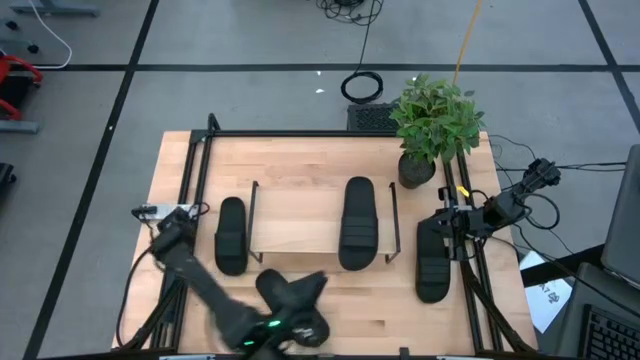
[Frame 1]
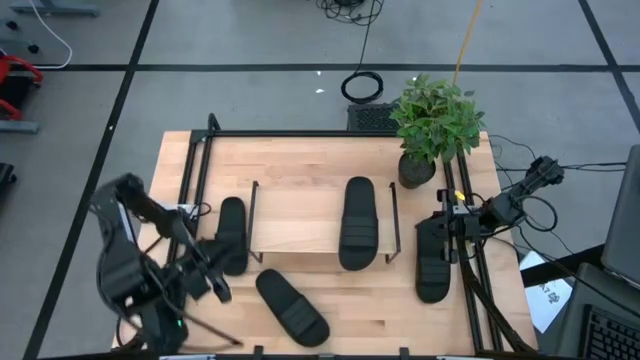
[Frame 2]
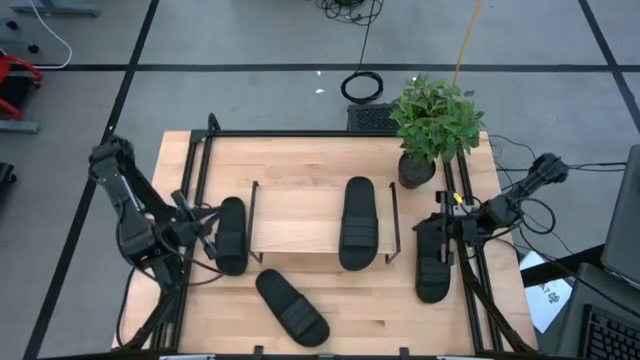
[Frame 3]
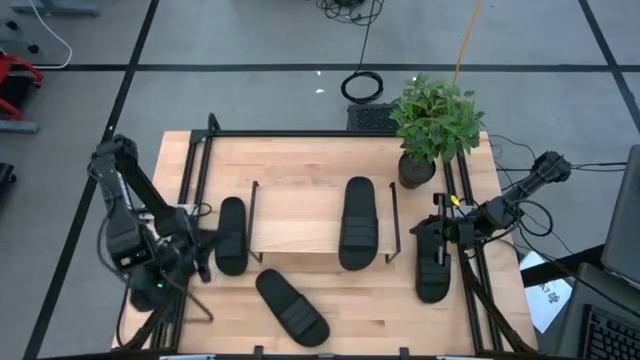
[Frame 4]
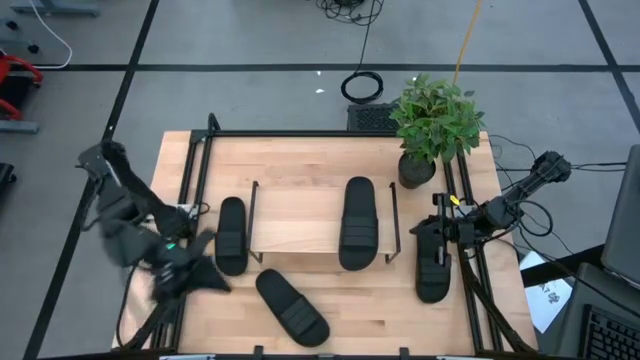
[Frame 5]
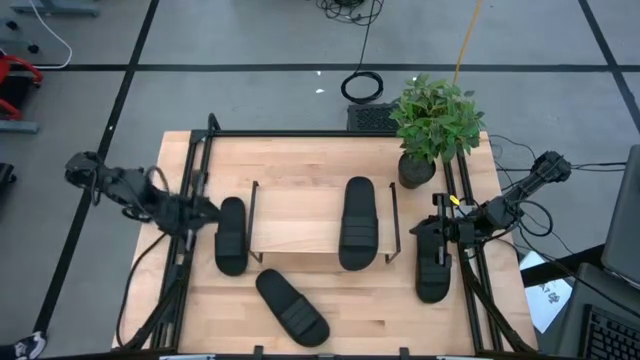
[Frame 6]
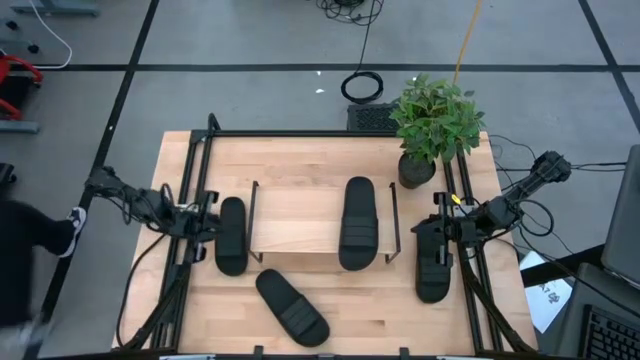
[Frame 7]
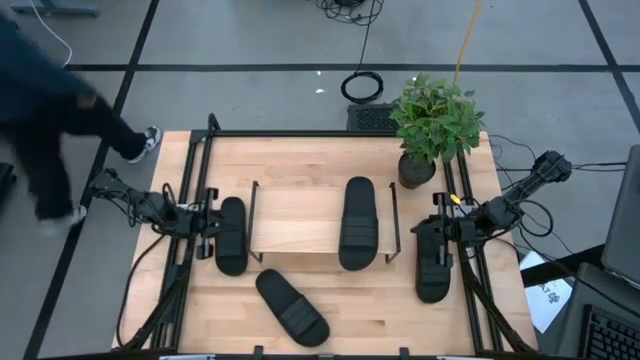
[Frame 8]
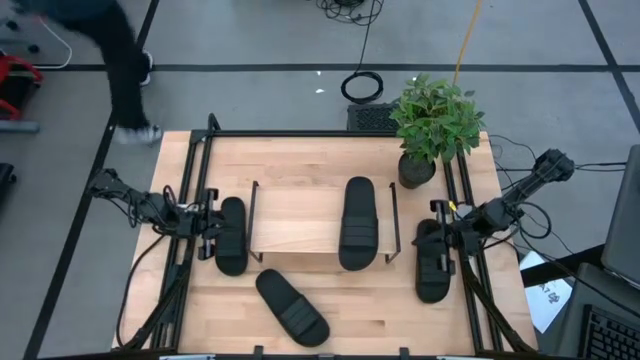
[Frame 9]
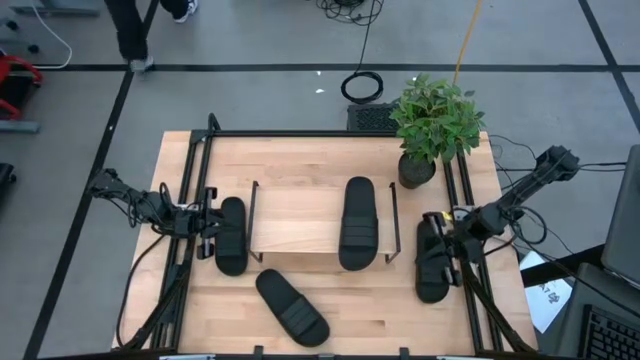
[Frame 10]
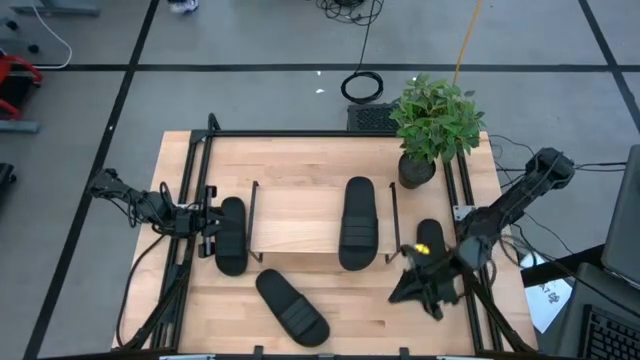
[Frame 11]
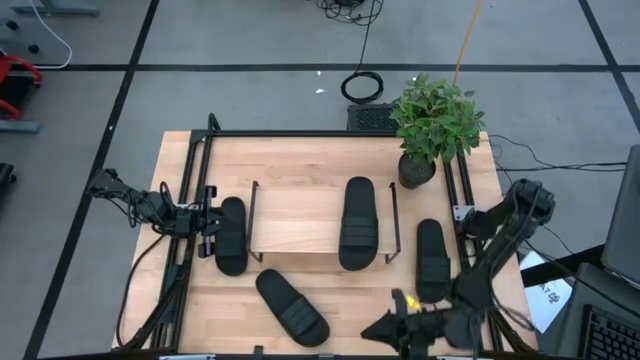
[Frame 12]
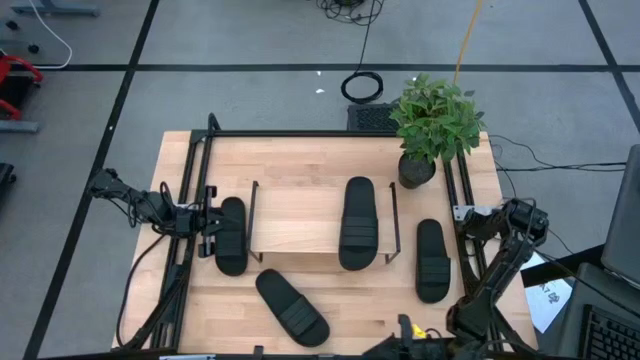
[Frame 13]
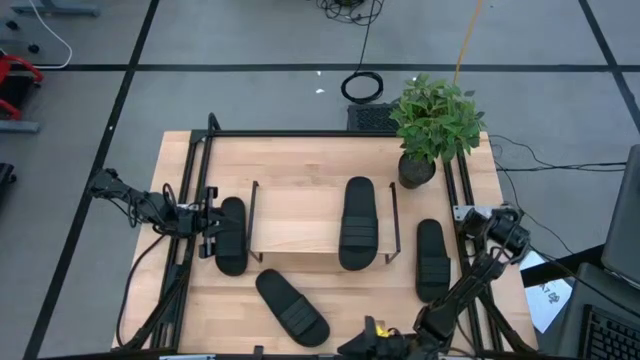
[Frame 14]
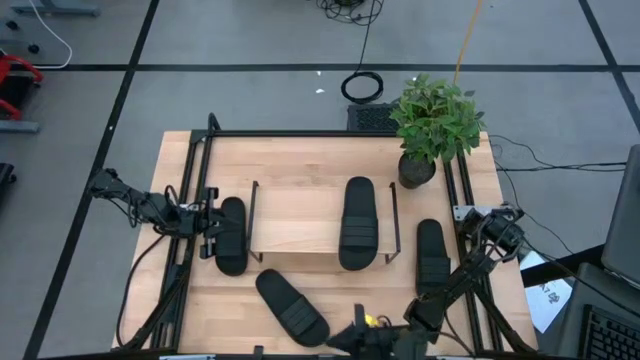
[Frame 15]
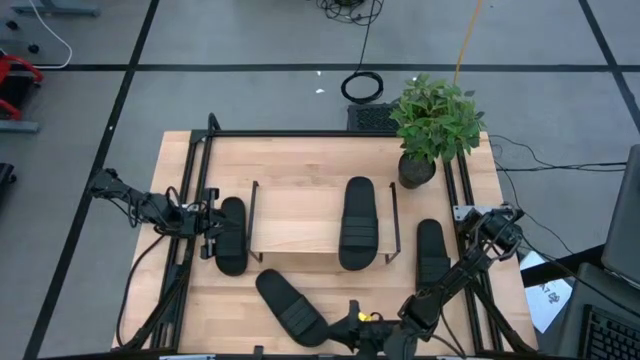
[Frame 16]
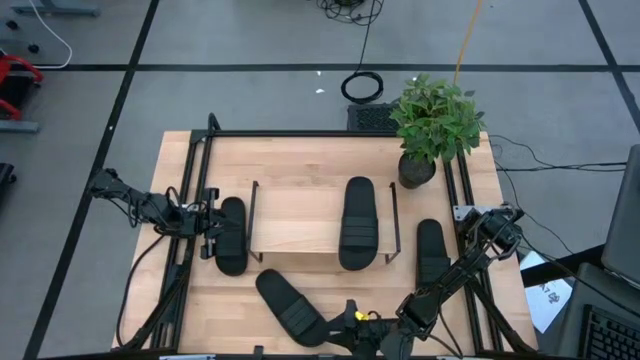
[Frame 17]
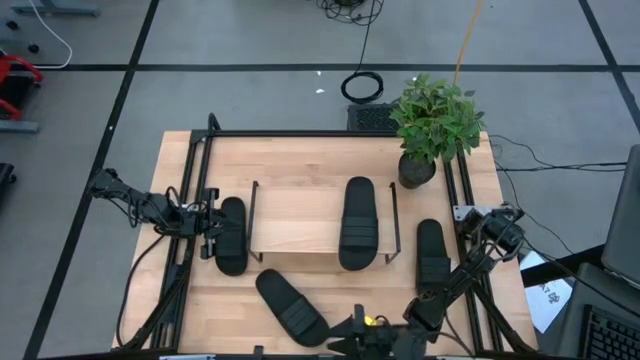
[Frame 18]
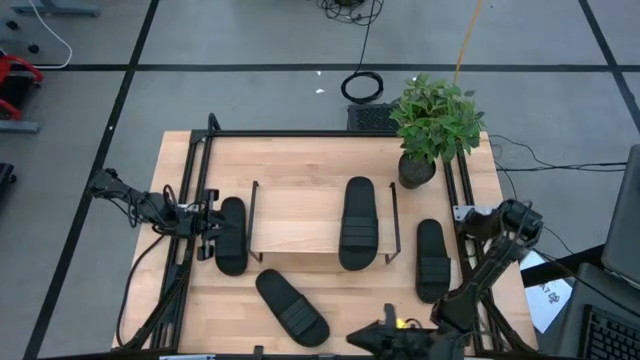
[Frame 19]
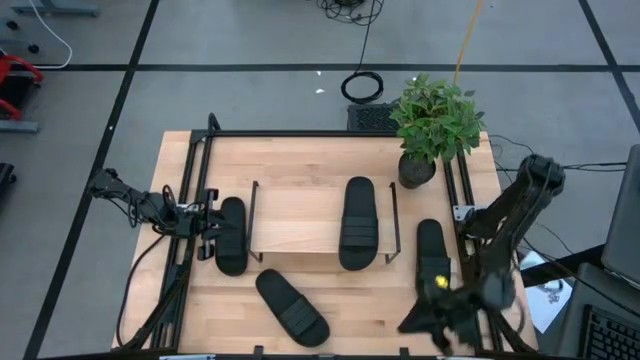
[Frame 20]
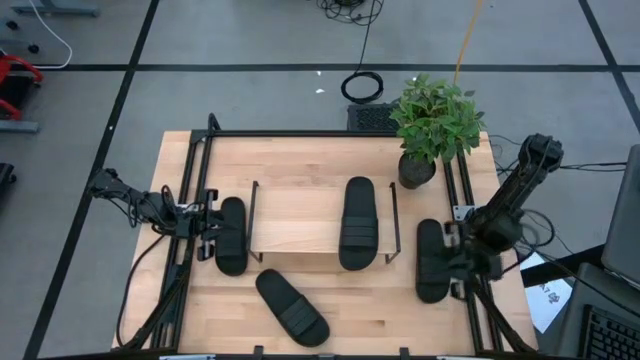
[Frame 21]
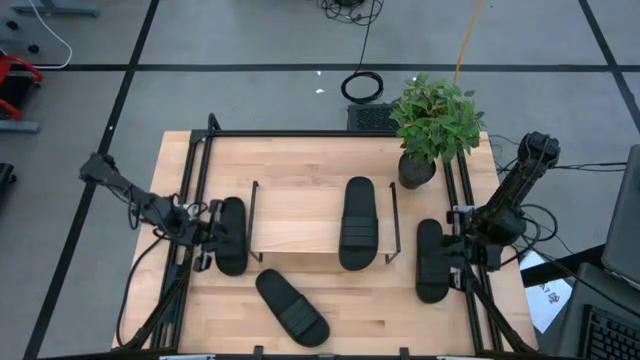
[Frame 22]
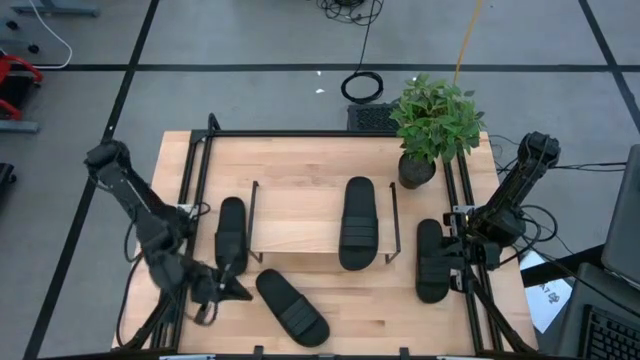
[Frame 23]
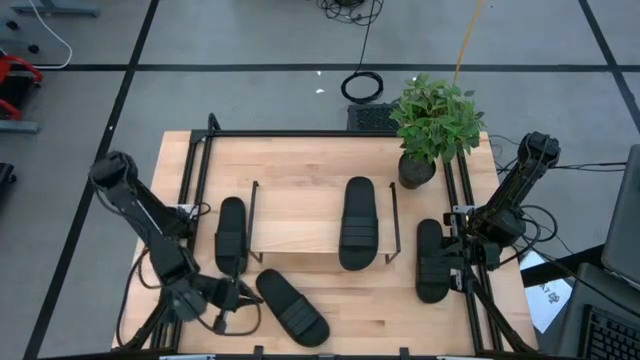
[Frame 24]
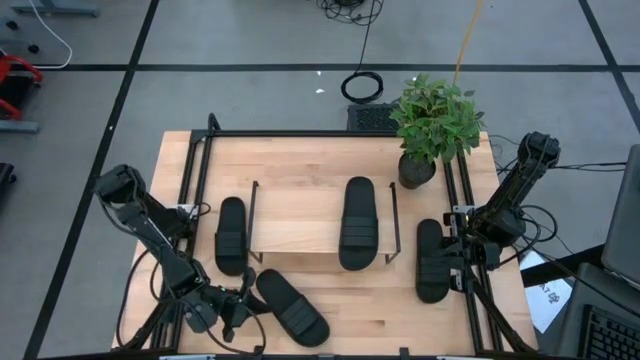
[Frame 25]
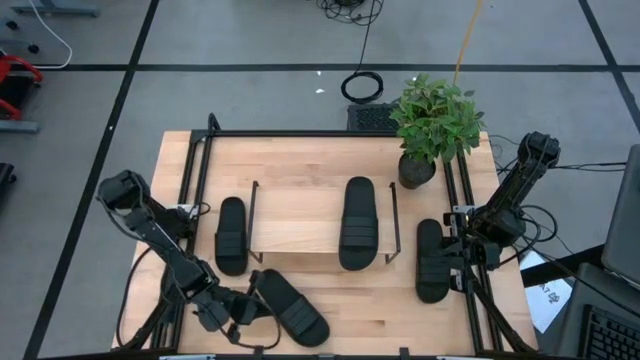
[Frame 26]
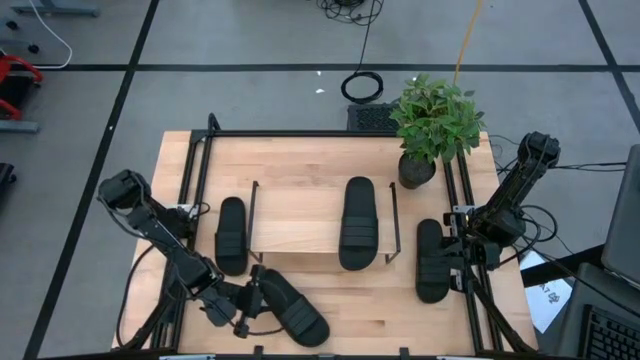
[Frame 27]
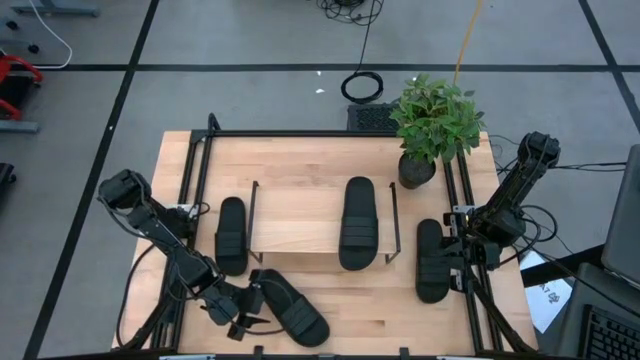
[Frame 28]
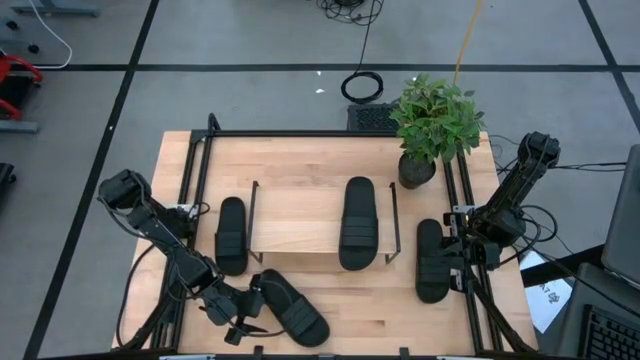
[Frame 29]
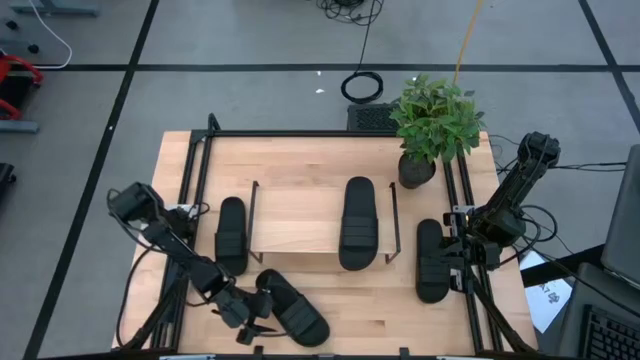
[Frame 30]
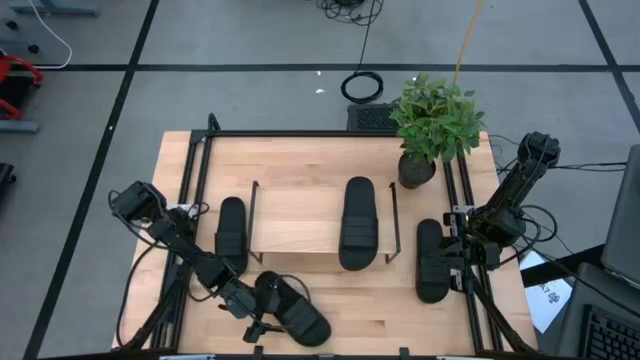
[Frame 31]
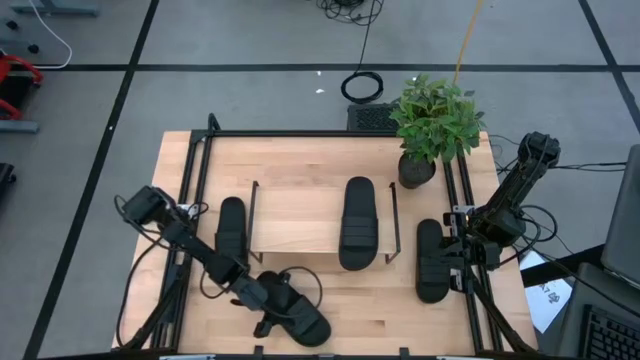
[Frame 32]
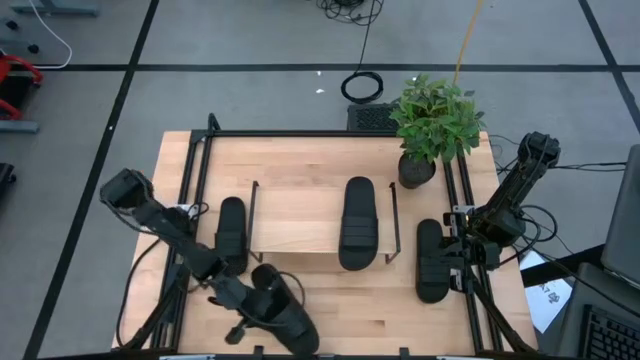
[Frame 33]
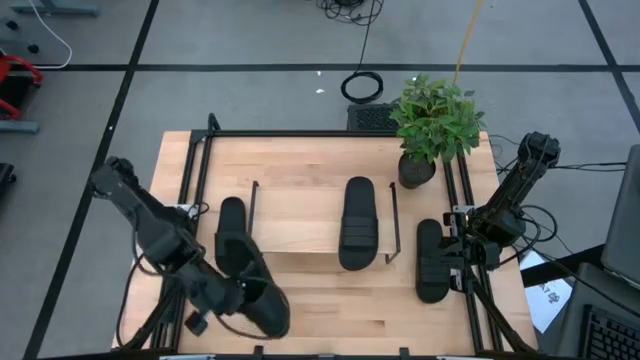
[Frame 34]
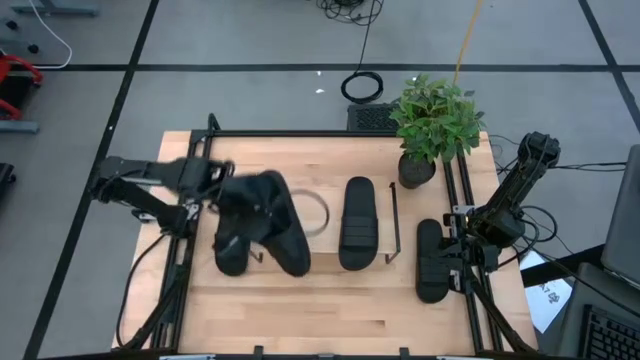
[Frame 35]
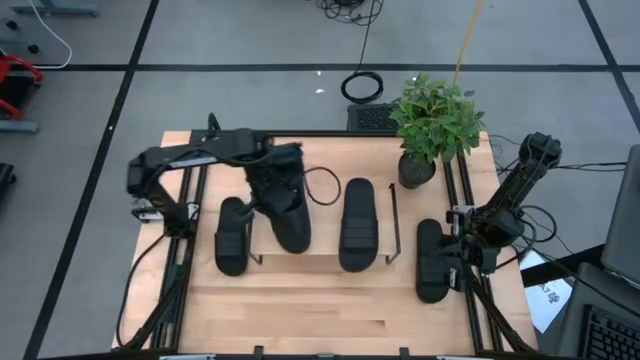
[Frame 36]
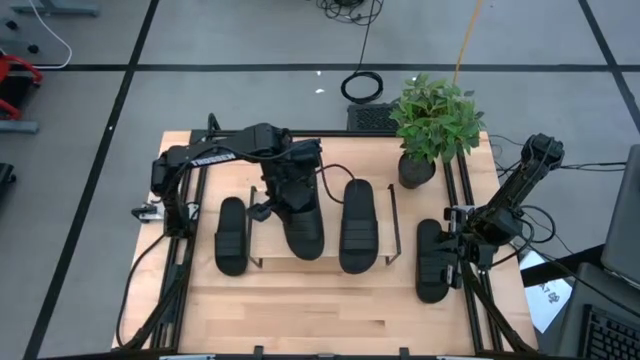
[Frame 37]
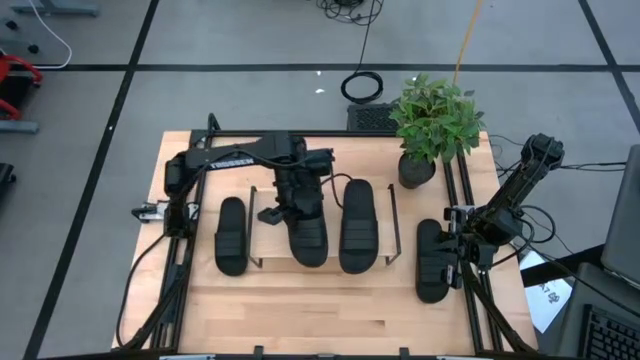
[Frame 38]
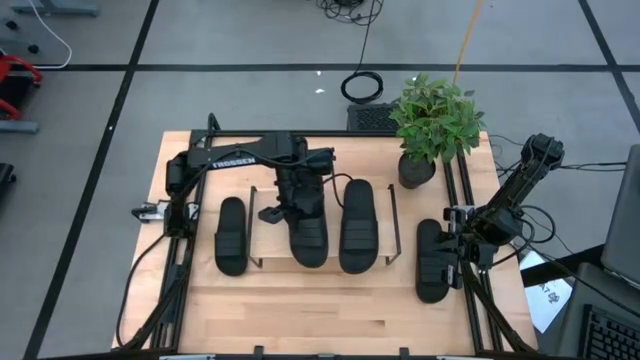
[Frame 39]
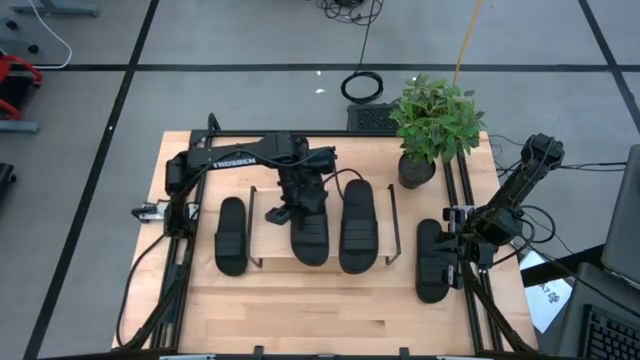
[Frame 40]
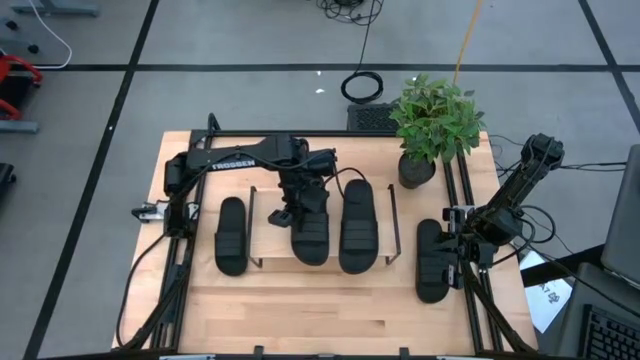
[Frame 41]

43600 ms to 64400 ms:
Task: Pick and place slides into the shelf
Put the bottom left black slide on the shelf

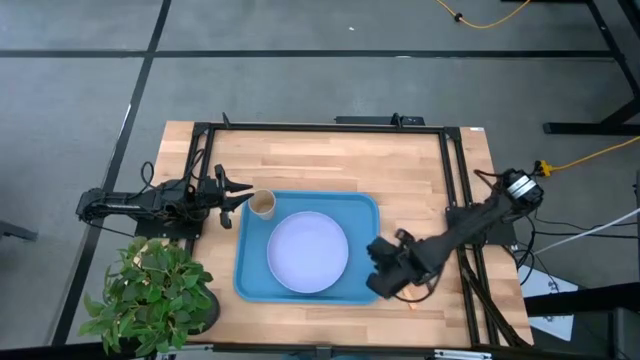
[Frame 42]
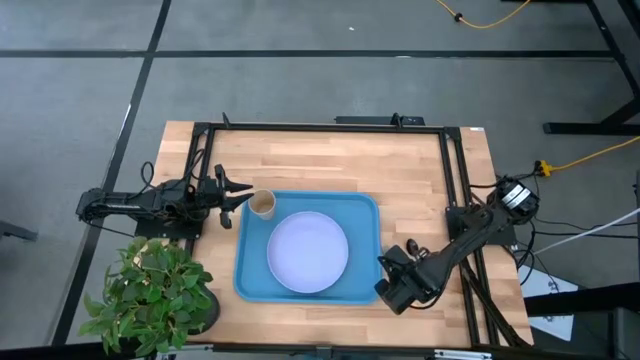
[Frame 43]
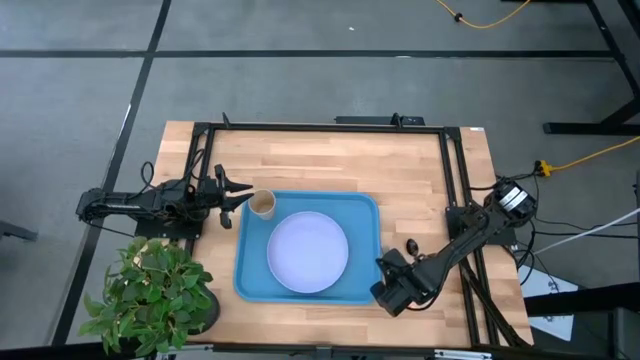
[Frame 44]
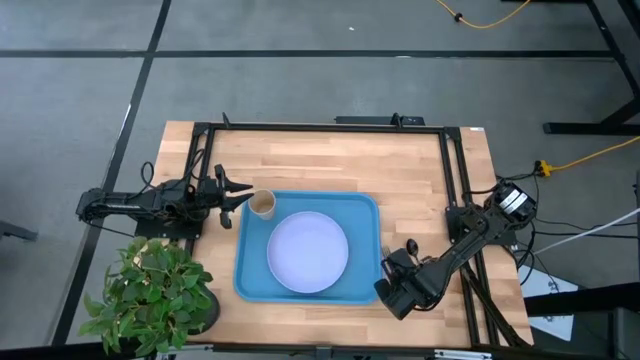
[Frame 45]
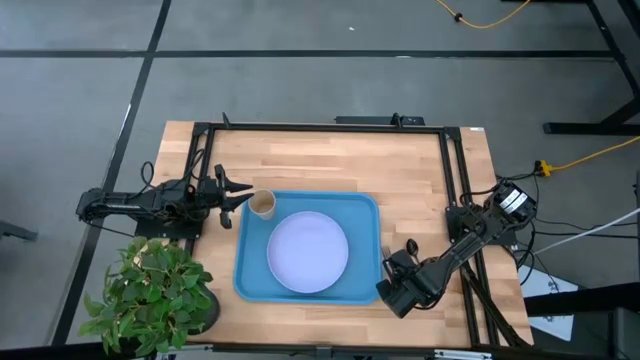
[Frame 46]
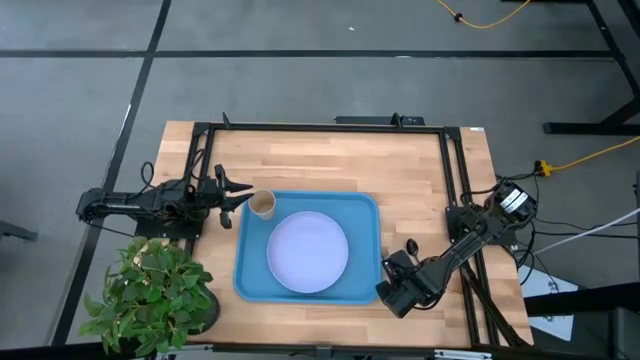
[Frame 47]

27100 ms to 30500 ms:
Task: Pick and place plate/cup/fork/spoon on tray
Put the yellow fork on the blue tray to the right of the purple plate
